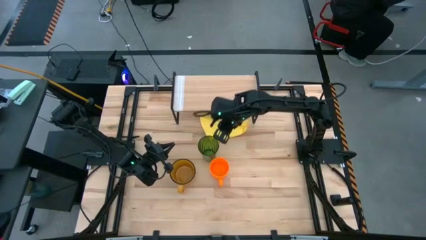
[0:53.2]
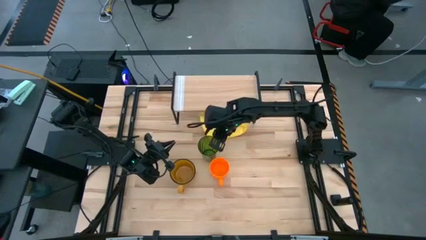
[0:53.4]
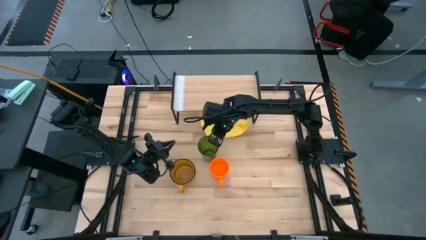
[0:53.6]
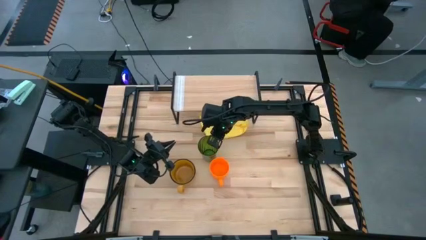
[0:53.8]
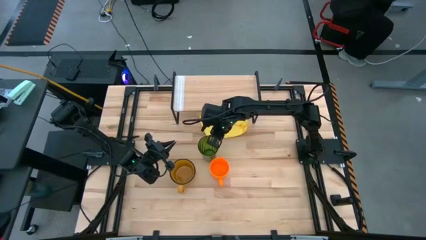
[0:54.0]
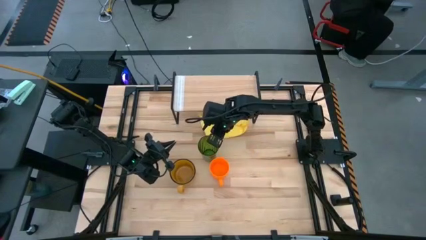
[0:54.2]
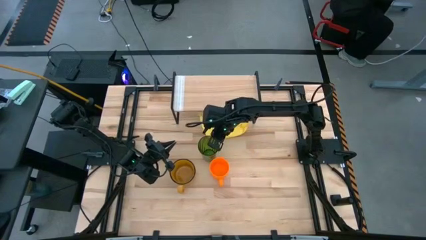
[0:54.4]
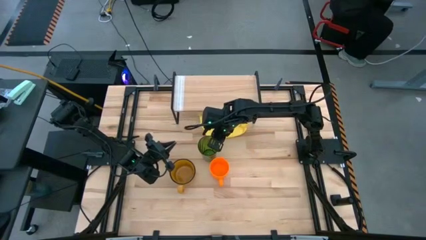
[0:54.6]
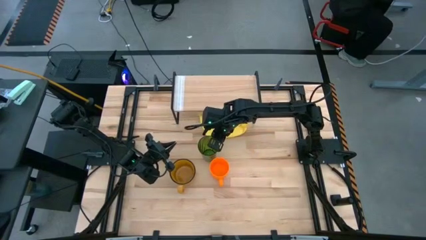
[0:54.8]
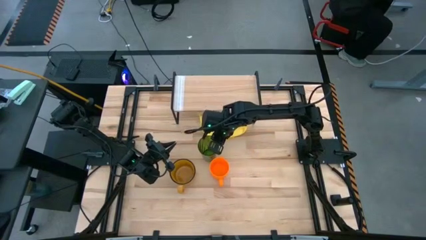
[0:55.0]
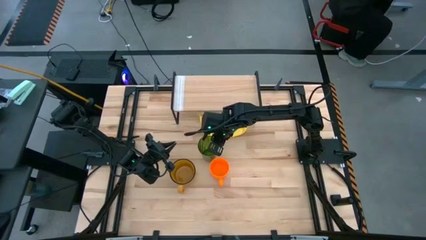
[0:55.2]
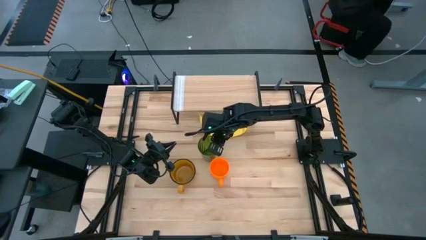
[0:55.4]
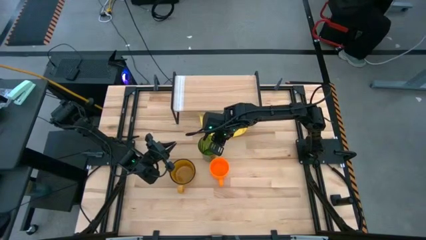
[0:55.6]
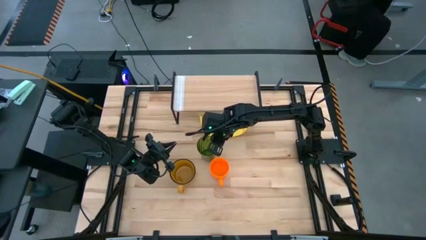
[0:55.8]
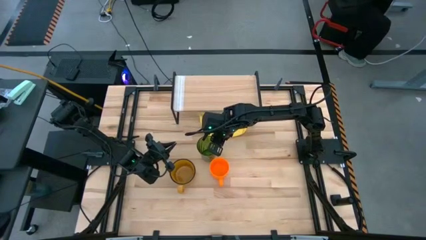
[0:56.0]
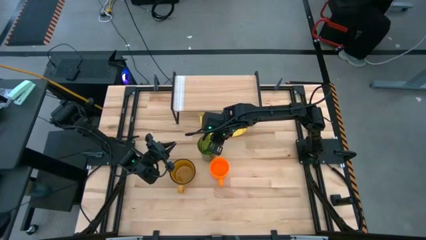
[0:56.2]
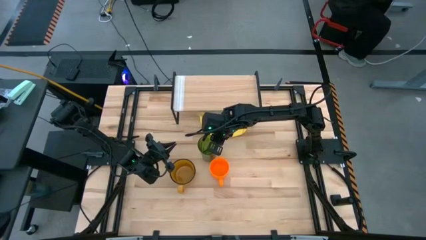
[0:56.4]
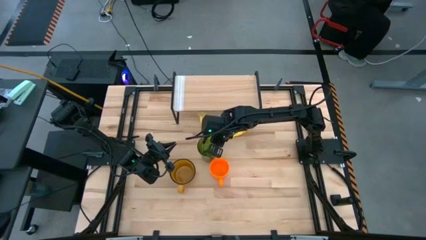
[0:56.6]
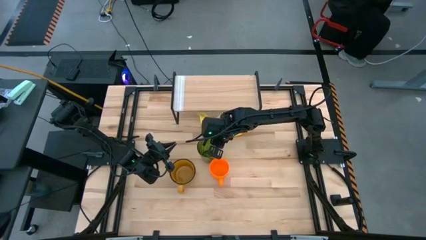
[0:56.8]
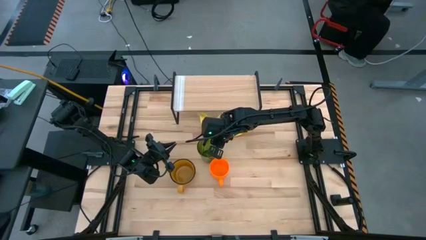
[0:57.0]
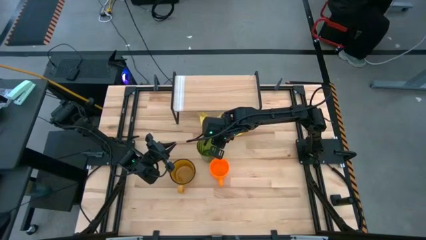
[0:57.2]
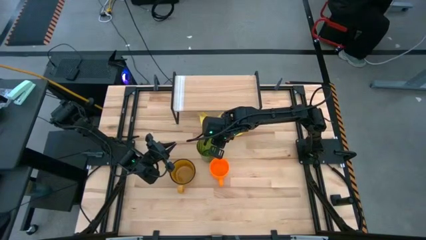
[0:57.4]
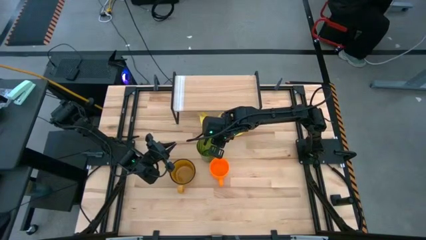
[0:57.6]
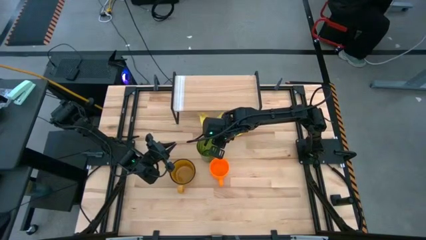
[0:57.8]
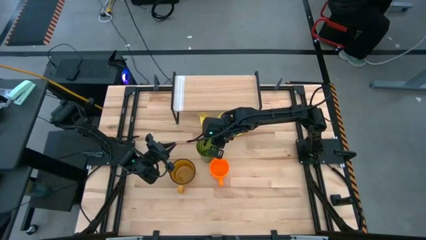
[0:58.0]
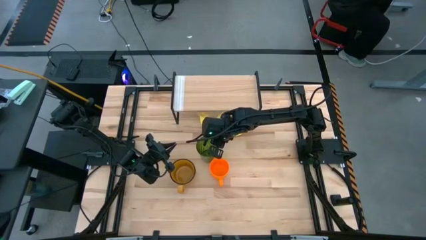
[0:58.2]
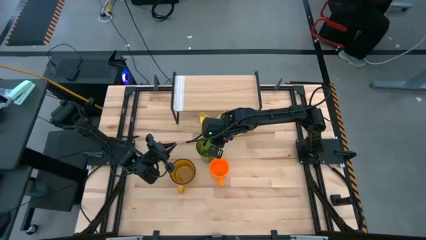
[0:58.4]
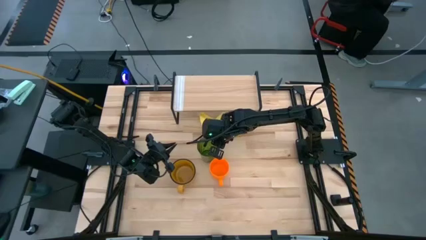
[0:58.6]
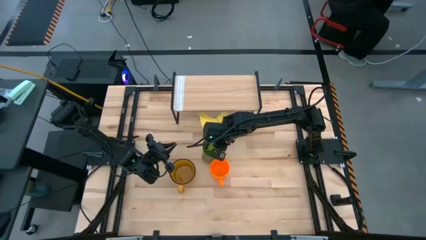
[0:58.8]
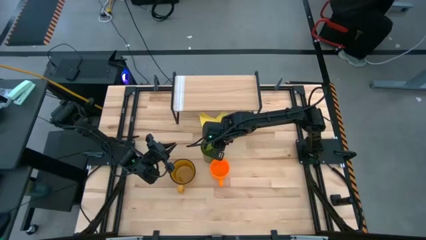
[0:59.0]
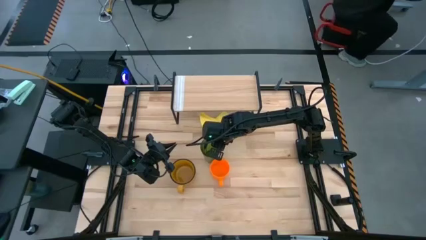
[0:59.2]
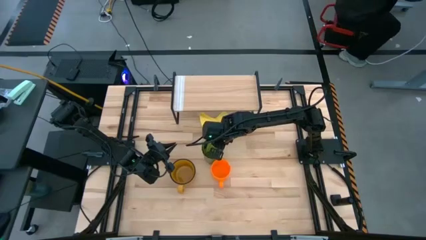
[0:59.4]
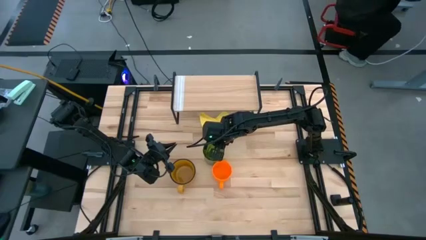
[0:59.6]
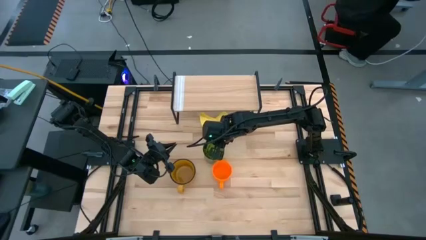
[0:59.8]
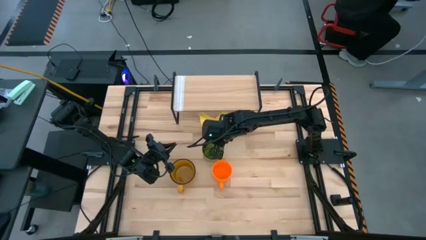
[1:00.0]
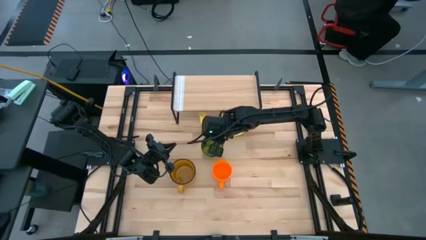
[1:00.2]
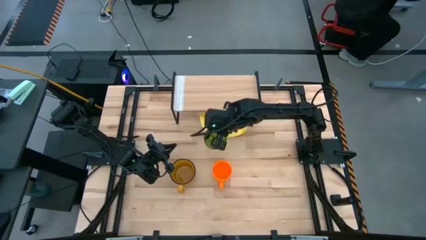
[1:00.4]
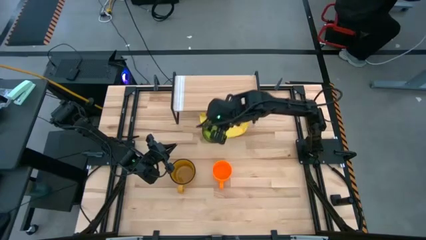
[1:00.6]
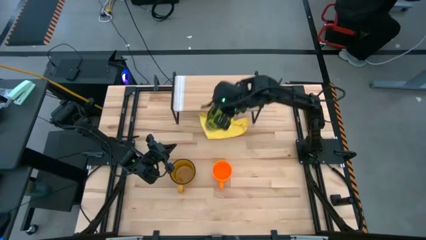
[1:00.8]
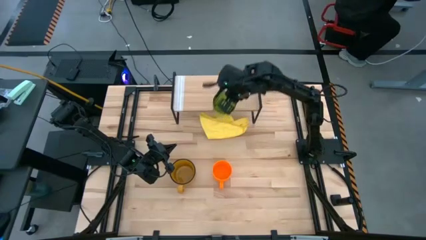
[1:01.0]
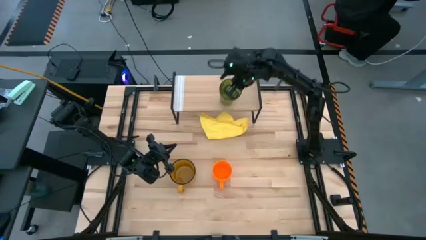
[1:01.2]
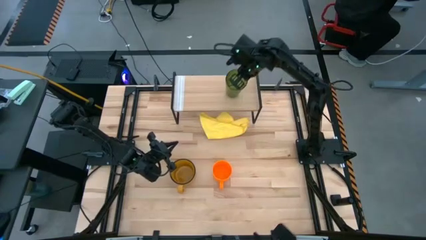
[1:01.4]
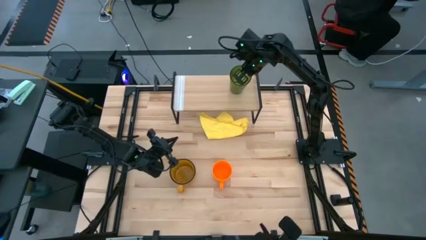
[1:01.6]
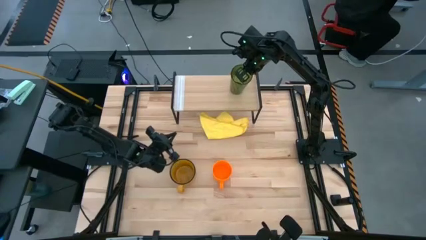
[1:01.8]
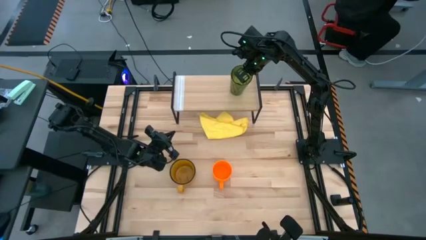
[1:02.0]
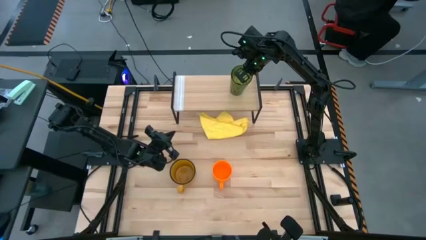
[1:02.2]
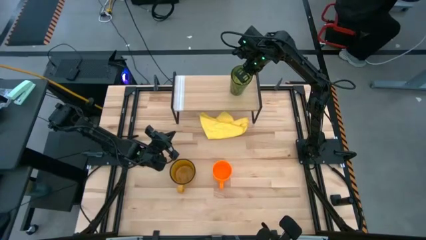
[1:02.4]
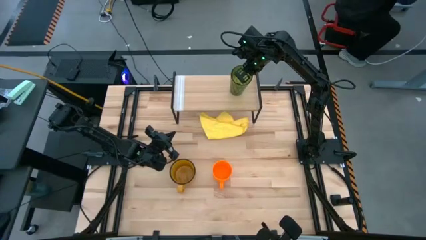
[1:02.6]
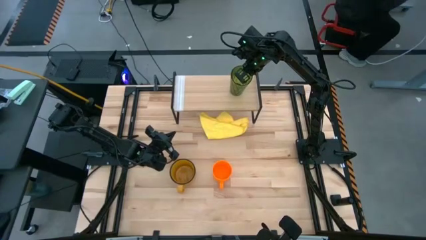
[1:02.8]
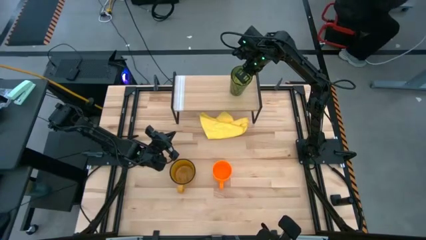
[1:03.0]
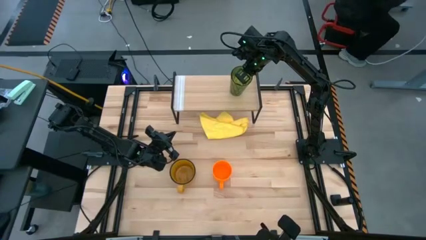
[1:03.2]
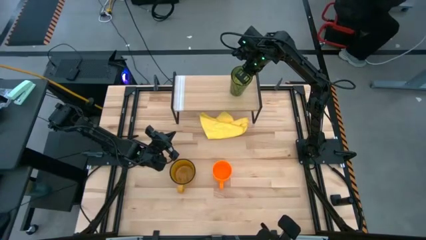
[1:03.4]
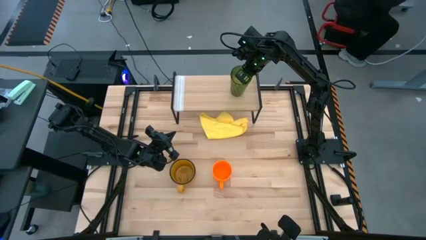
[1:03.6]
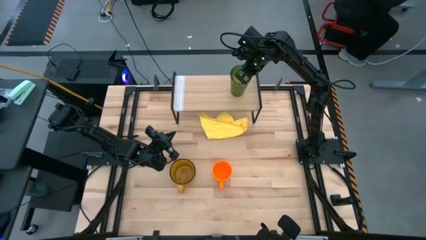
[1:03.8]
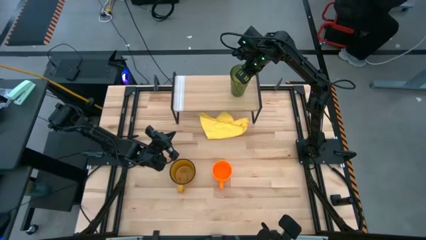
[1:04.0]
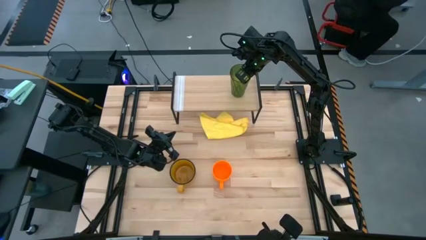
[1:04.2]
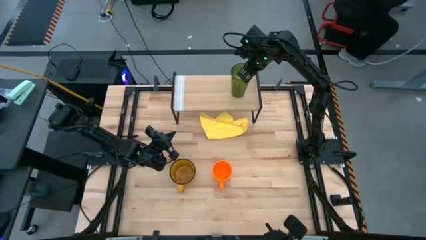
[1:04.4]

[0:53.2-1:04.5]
Task: Stack small to large cups/mugs on shelf
Put the green cup on the shelf
